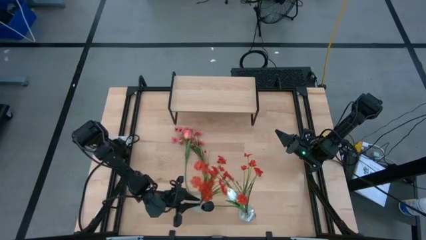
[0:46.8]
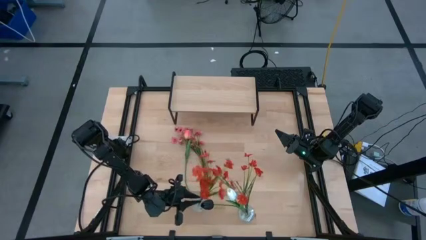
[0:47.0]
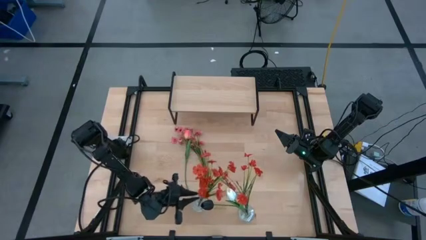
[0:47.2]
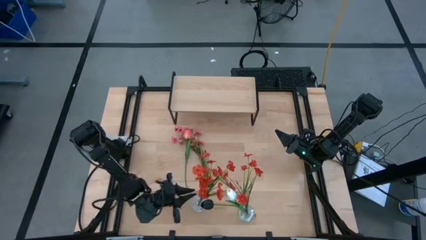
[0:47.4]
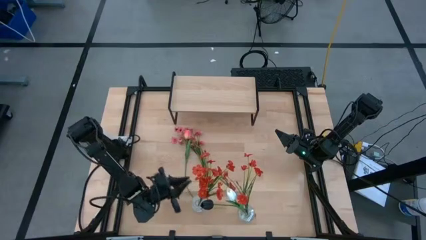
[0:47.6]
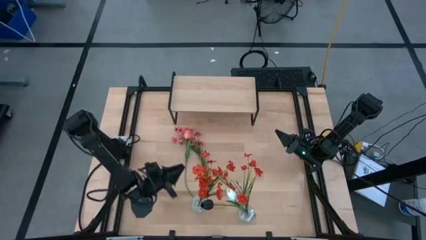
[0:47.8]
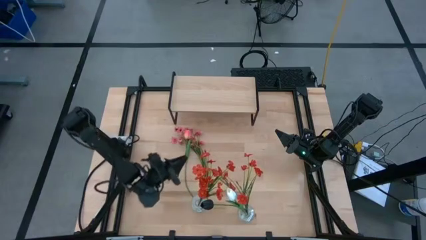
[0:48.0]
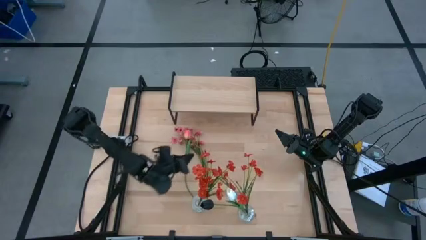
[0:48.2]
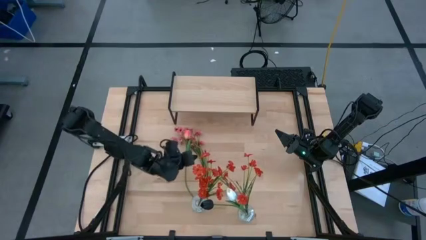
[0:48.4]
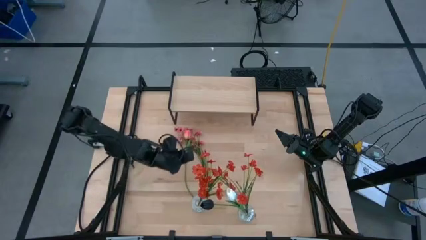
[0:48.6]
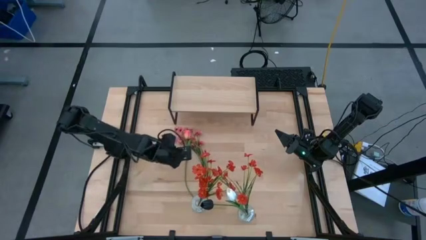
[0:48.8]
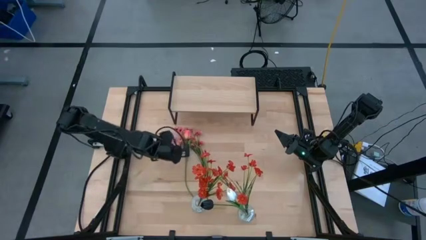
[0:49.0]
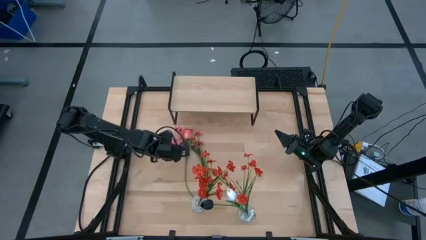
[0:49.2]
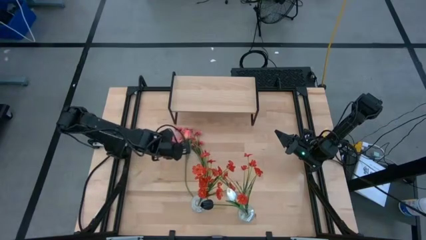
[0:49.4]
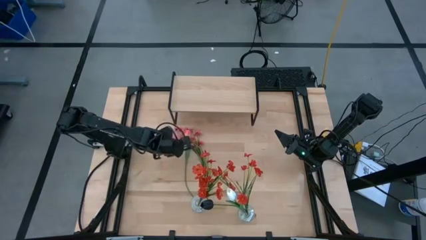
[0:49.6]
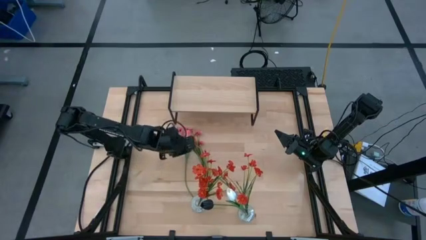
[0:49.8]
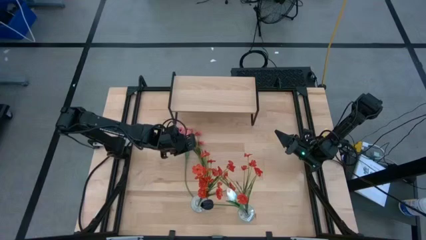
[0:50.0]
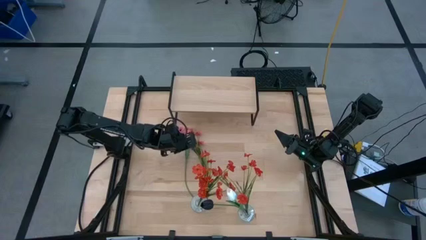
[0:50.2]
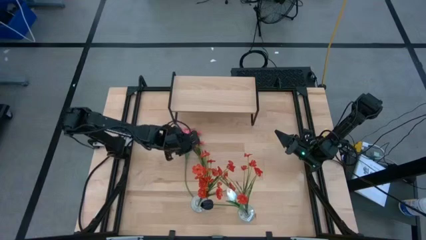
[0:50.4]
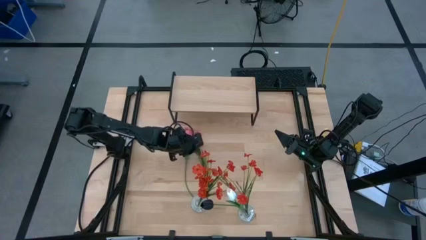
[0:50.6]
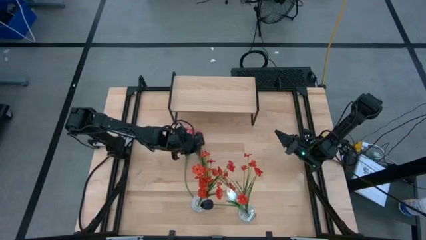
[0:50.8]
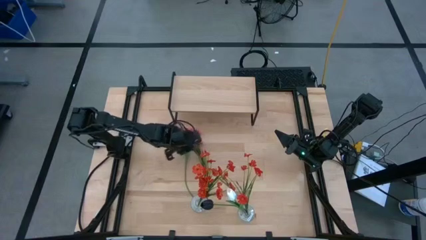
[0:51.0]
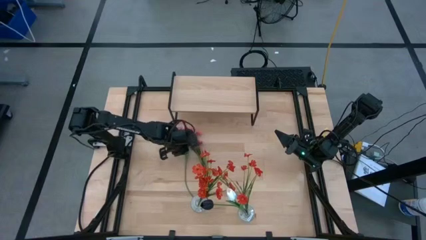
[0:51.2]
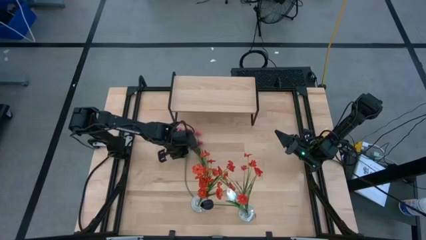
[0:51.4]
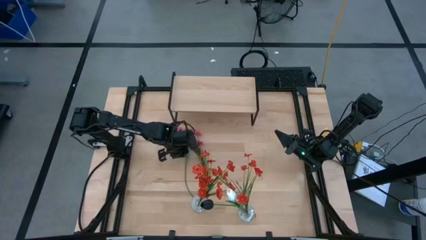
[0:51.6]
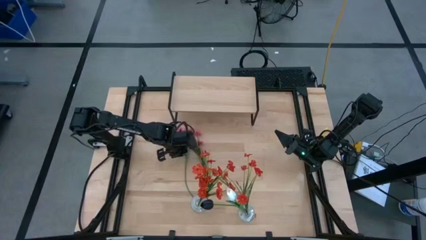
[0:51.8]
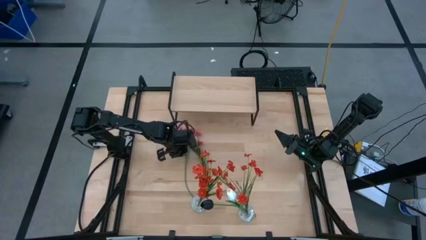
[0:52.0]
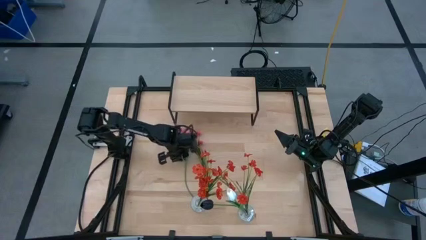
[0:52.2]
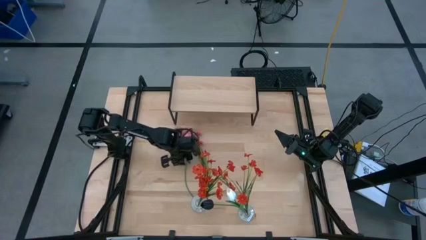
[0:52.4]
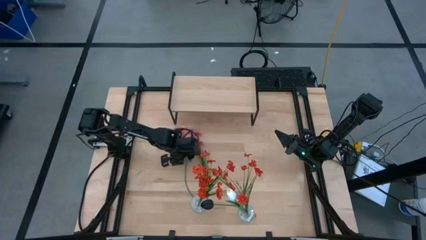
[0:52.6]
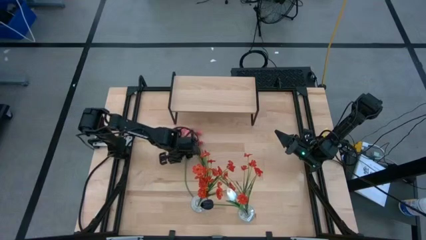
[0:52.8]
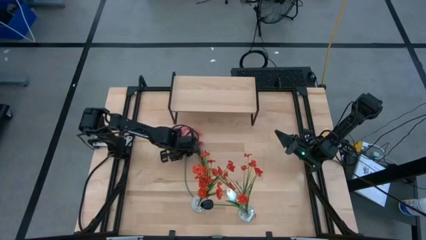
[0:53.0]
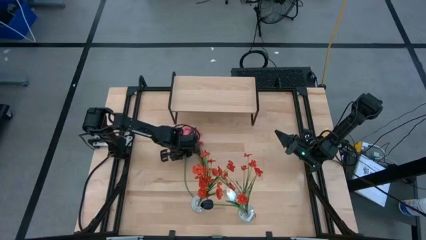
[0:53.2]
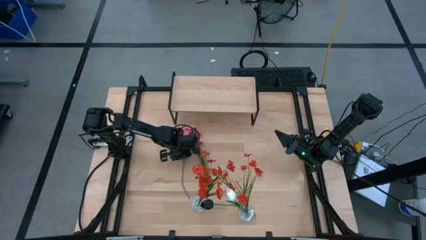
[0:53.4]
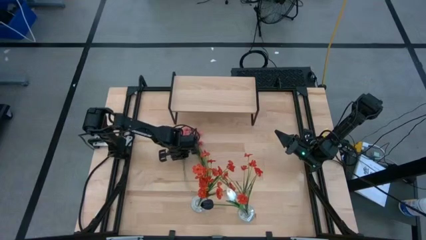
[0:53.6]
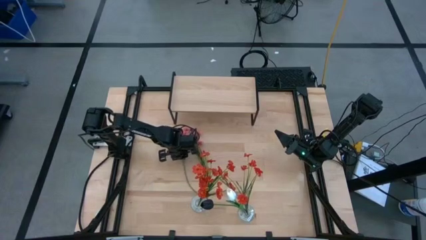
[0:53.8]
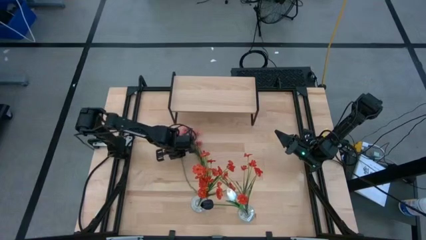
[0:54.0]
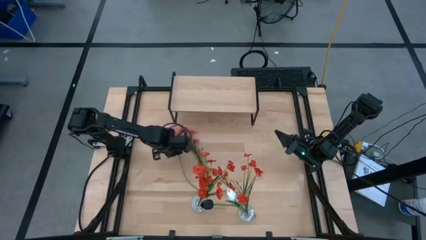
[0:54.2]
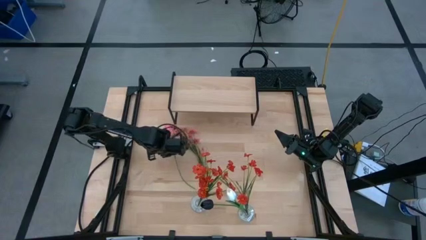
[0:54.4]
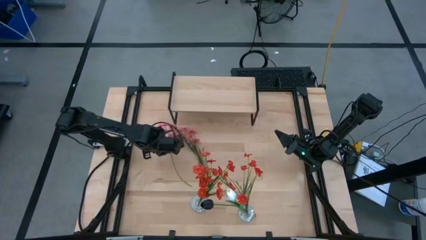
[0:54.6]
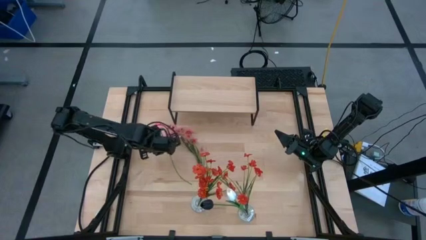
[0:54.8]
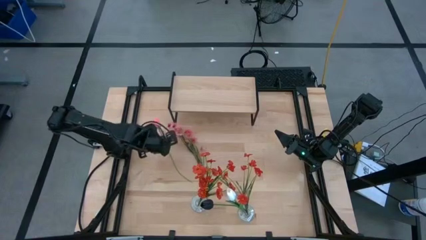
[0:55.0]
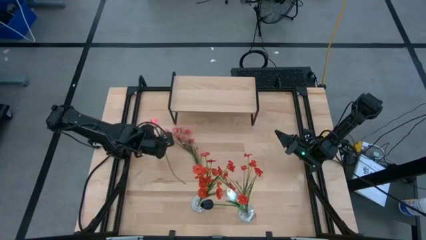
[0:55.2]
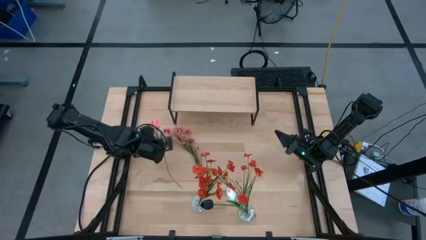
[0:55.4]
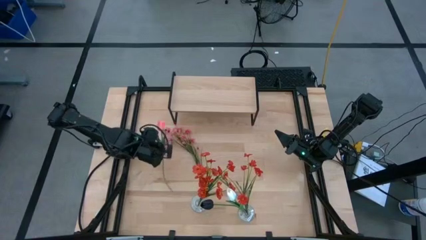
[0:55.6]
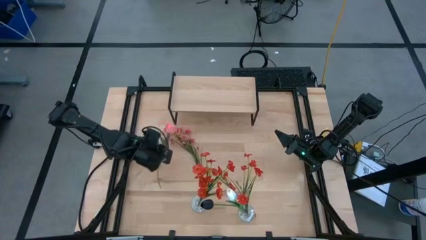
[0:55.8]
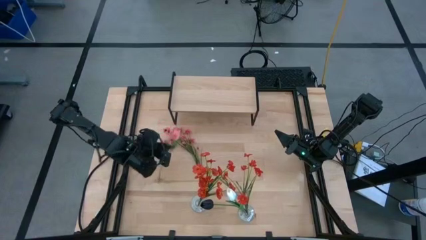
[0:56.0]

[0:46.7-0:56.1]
Task: Pick and place flowers into a vace then onto a shelf
Put the light pink flower into the left transparent vase

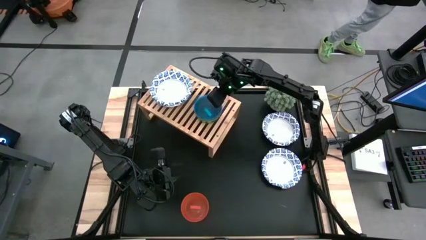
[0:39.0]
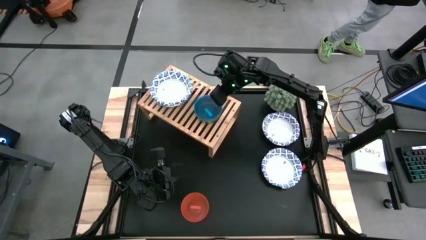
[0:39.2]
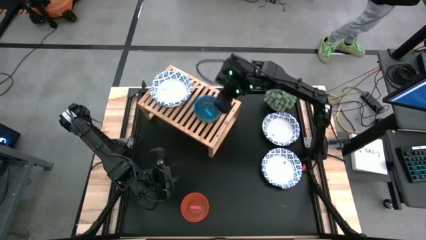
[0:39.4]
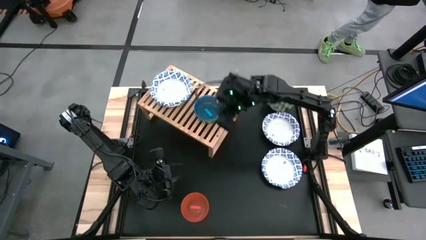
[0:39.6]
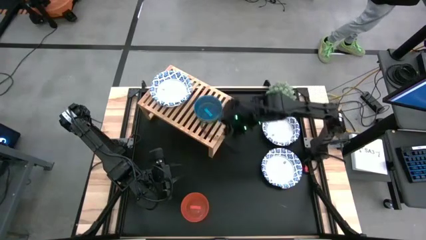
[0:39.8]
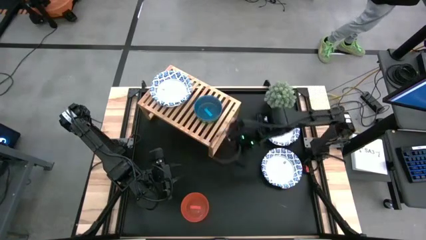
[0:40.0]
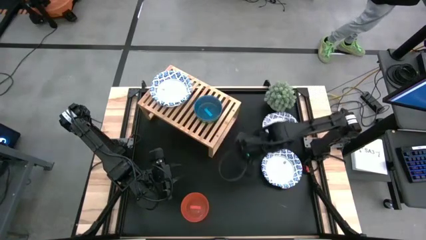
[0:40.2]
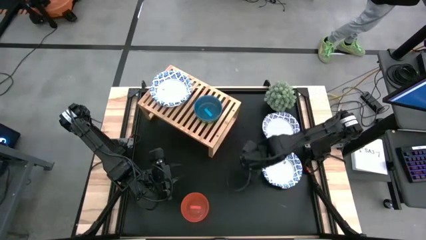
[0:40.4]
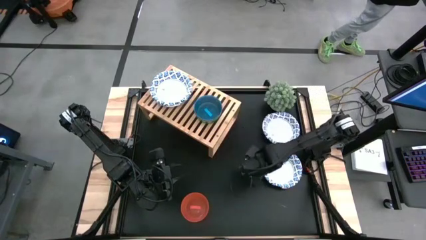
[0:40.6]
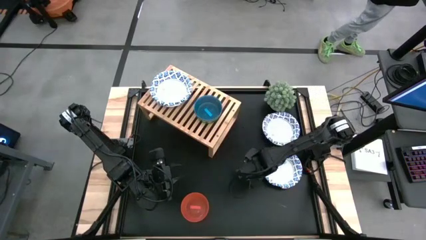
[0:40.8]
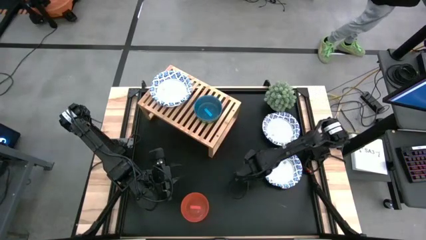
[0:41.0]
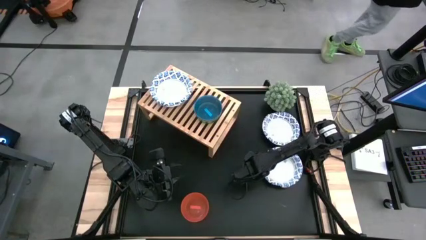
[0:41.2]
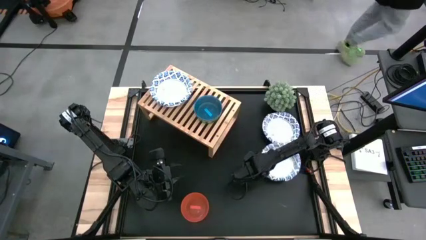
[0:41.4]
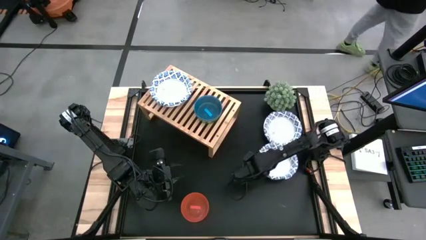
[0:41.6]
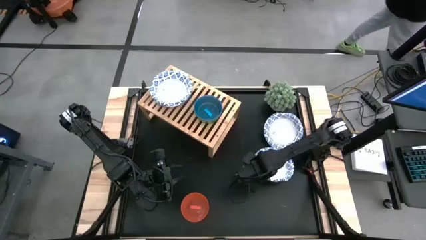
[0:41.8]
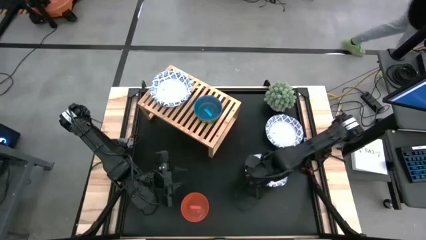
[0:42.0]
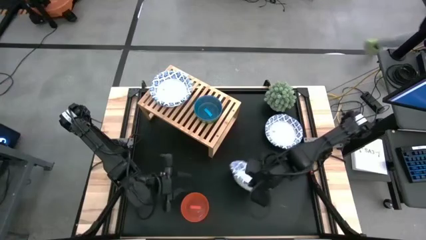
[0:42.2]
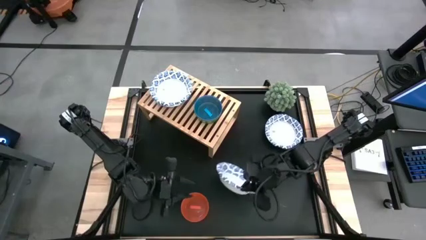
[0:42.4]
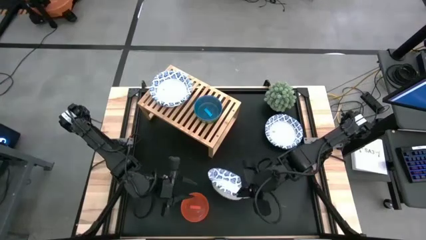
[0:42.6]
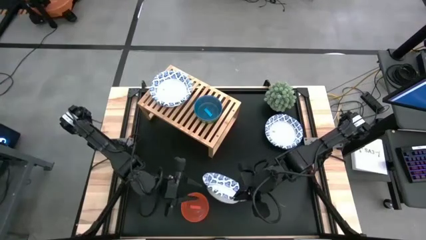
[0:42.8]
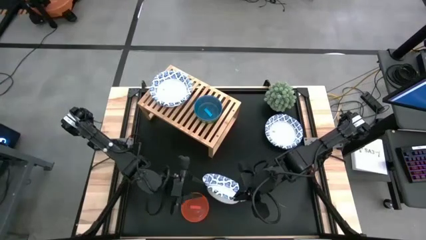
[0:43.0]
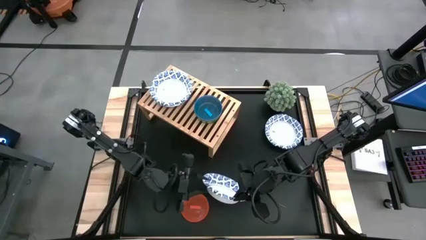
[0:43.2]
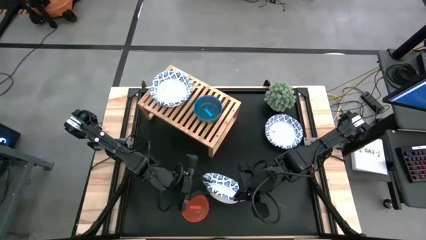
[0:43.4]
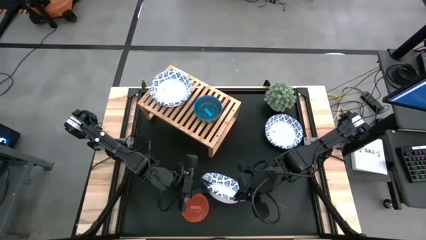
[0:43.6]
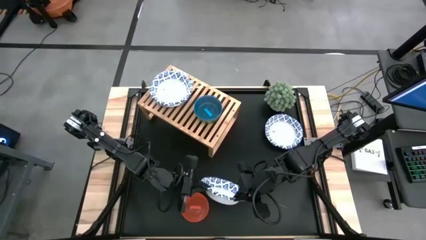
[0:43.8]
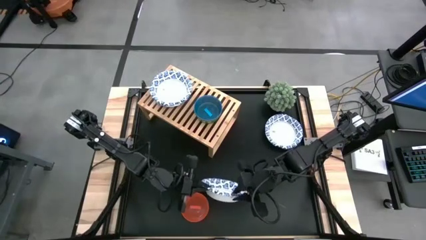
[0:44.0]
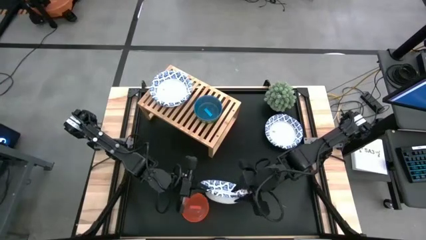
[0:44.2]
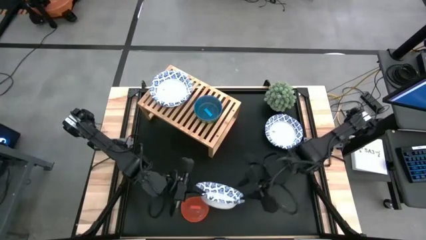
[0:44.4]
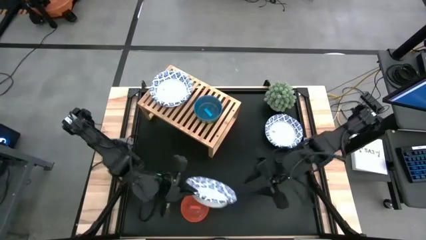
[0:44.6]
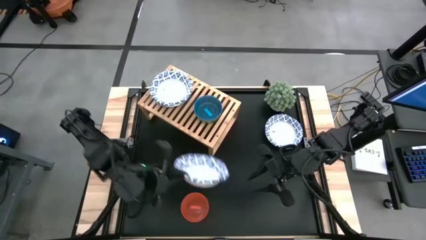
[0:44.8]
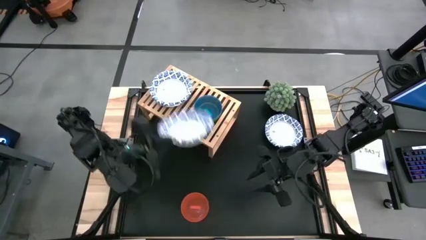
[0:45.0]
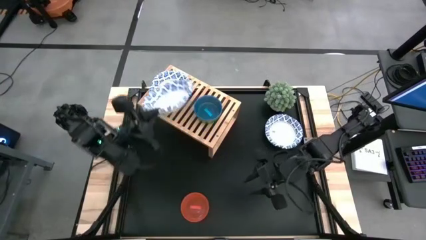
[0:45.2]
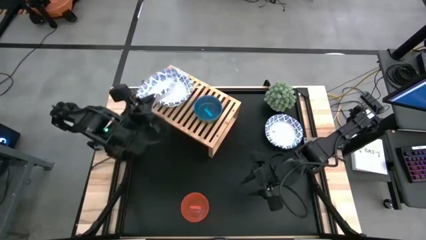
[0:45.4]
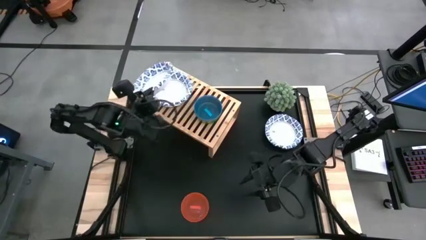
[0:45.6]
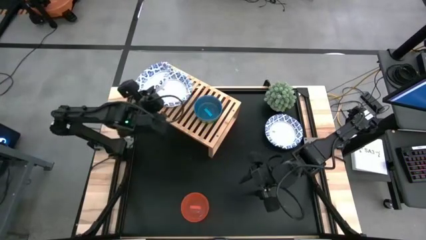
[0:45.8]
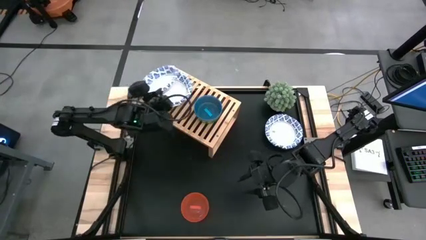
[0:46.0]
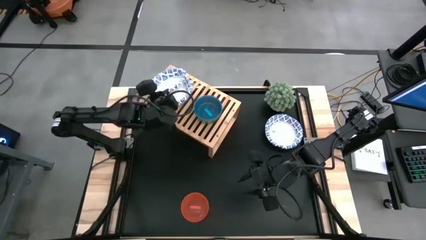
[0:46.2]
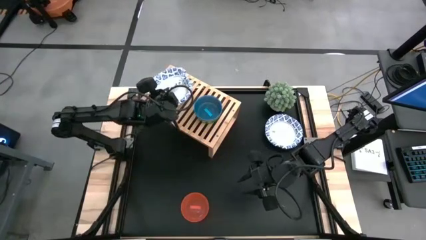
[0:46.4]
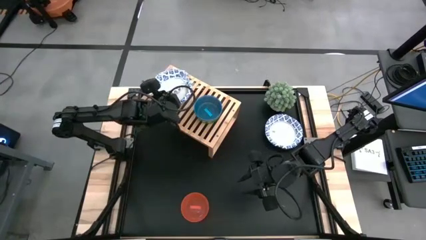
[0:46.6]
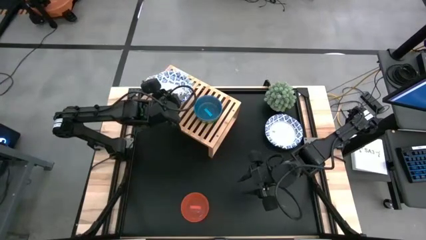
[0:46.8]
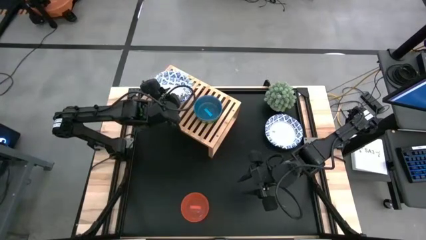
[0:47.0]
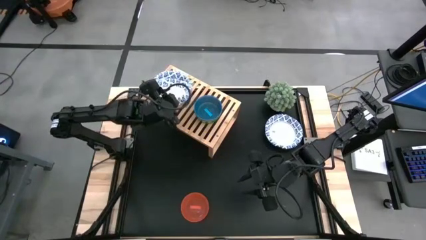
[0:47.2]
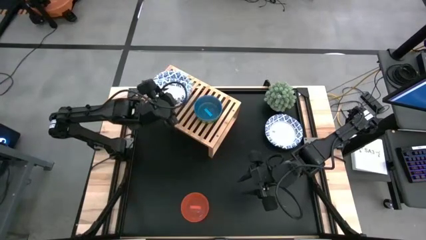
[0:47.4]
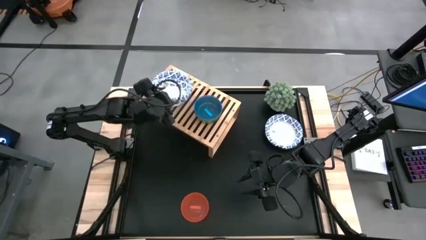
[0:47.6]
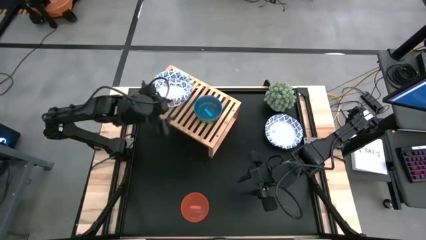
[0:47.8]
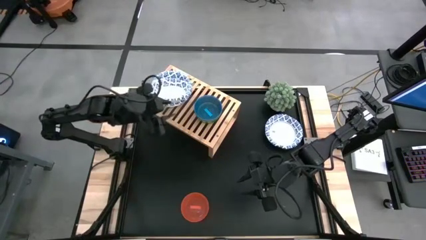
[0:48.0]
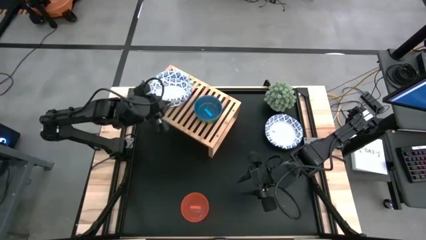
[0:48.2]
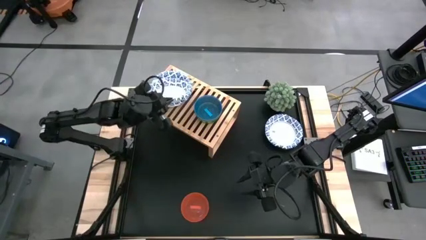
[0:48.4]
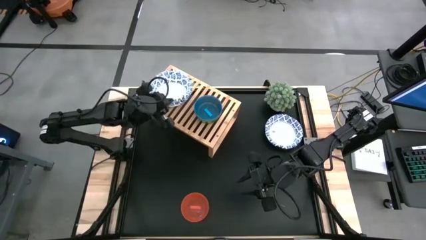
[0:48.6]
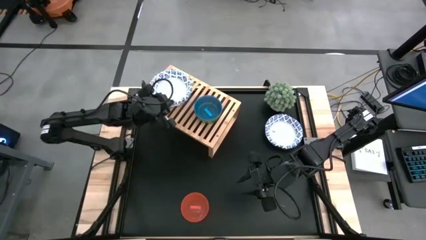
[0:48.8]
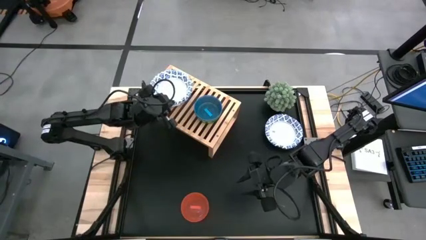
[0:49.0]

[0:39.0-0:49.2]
Task: Place and stack bowls onto a shelf
Stack the bottom patterned bowl into the white patterned bowl on the shelf
